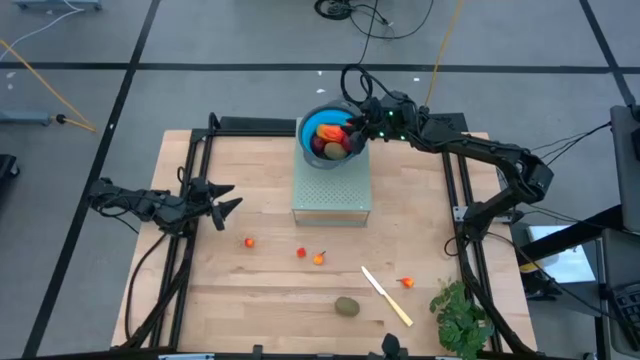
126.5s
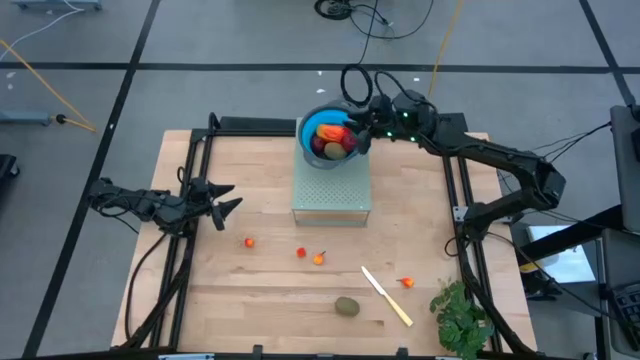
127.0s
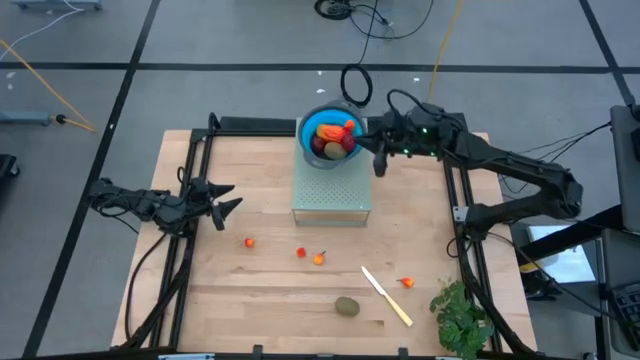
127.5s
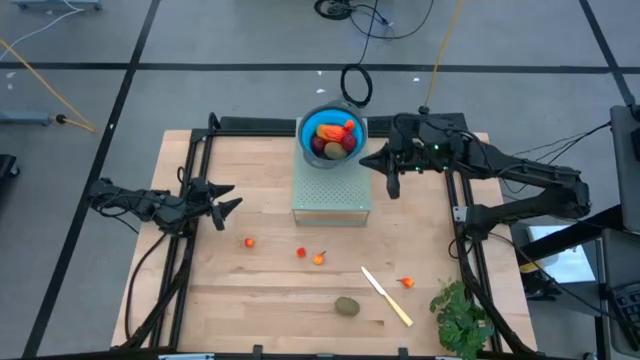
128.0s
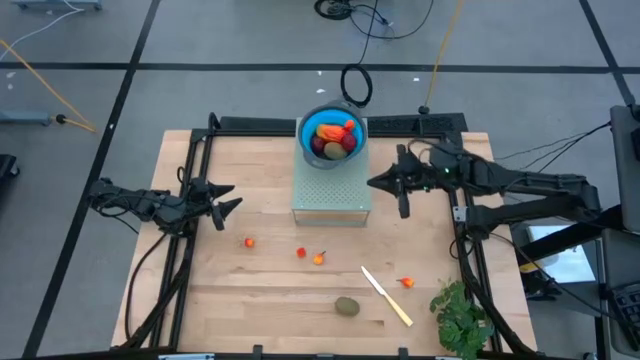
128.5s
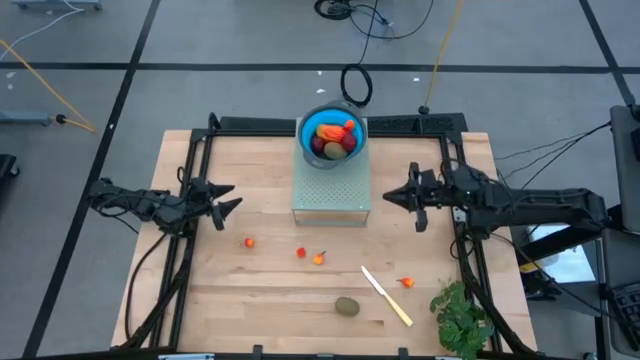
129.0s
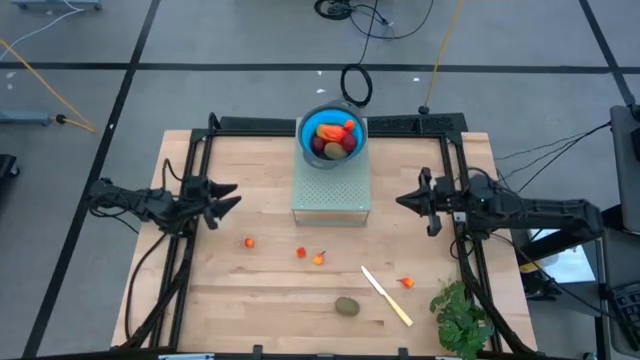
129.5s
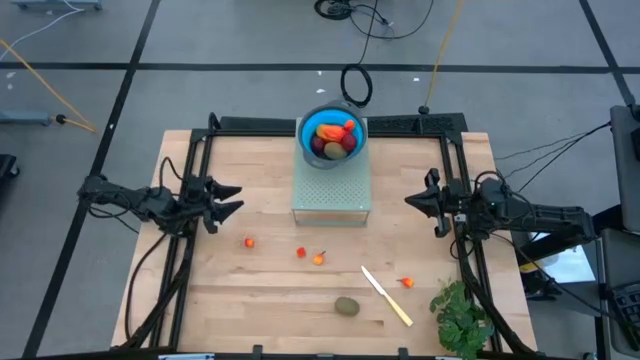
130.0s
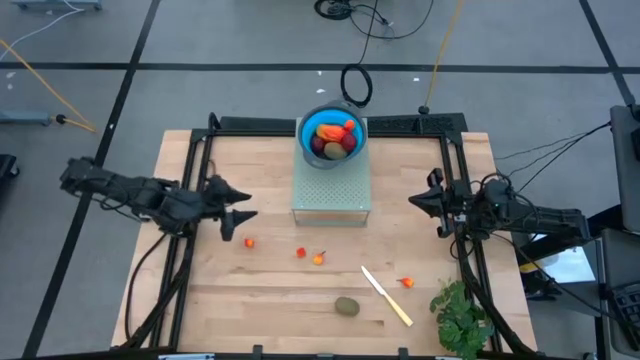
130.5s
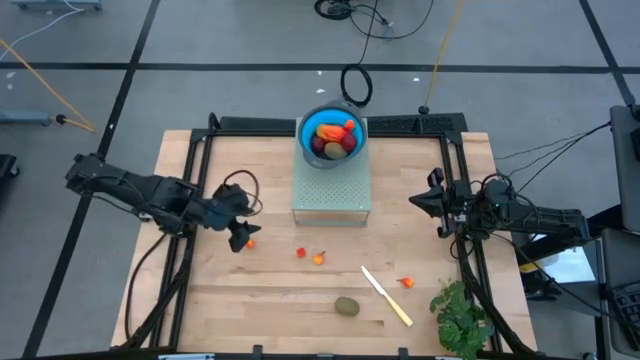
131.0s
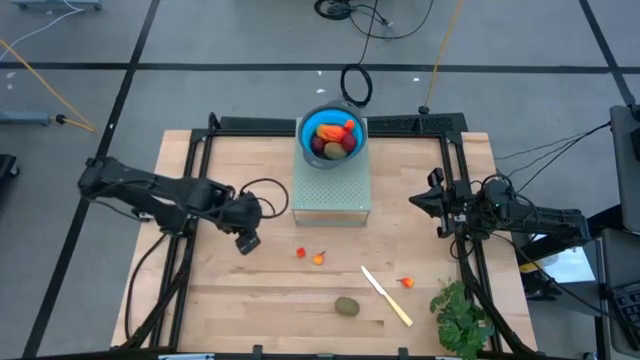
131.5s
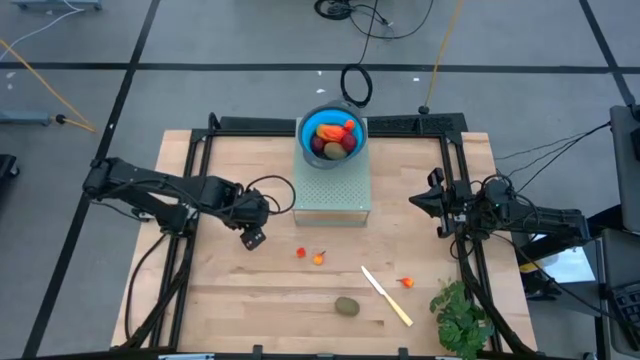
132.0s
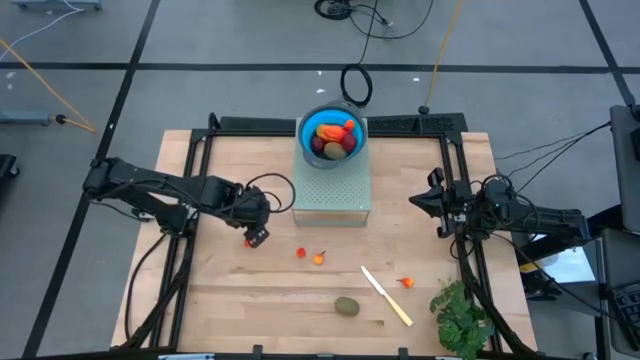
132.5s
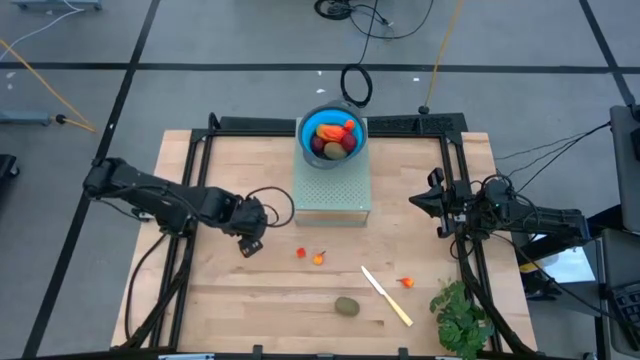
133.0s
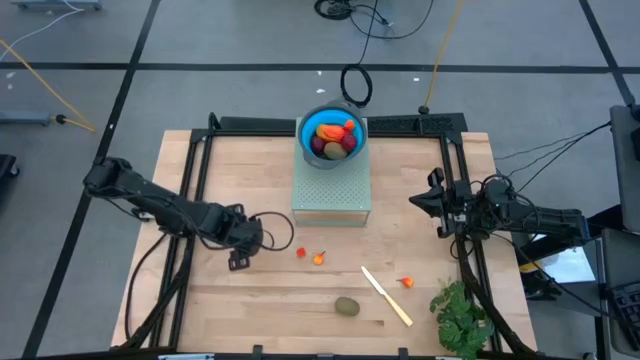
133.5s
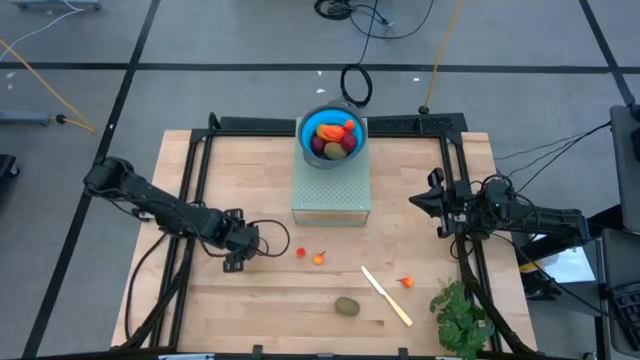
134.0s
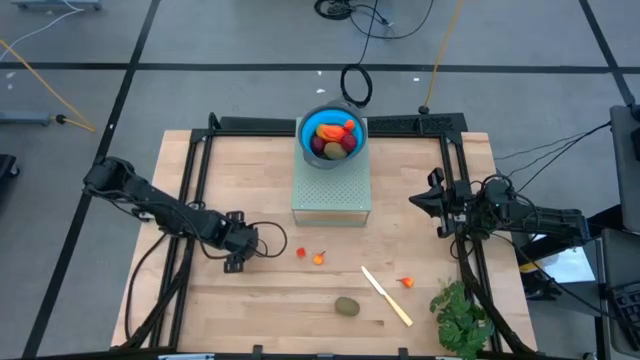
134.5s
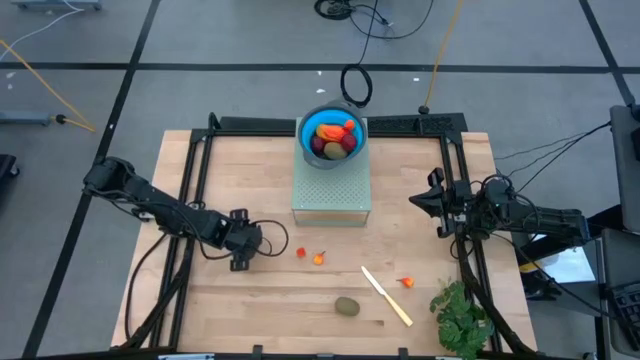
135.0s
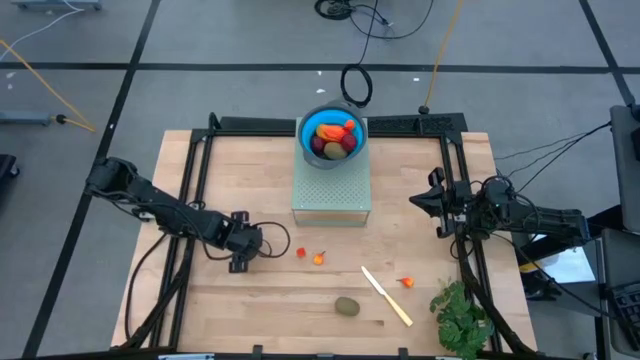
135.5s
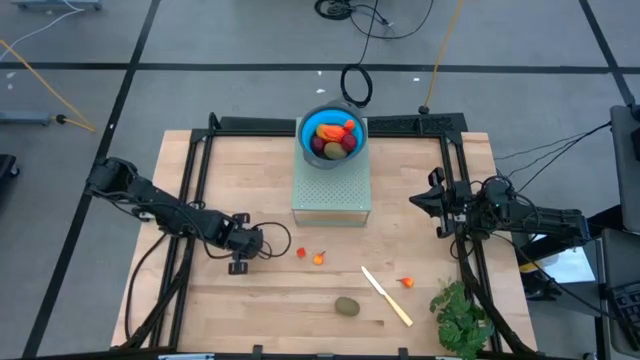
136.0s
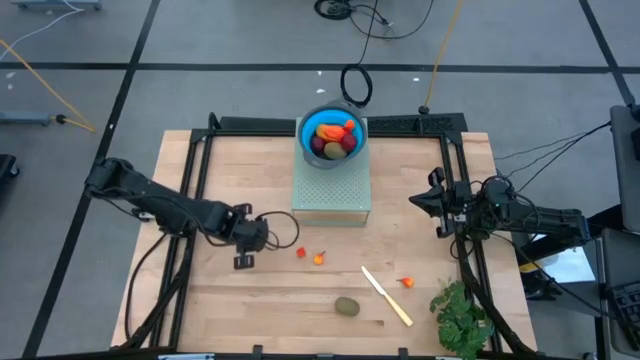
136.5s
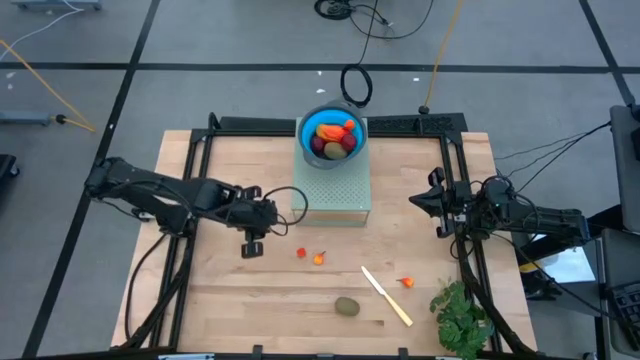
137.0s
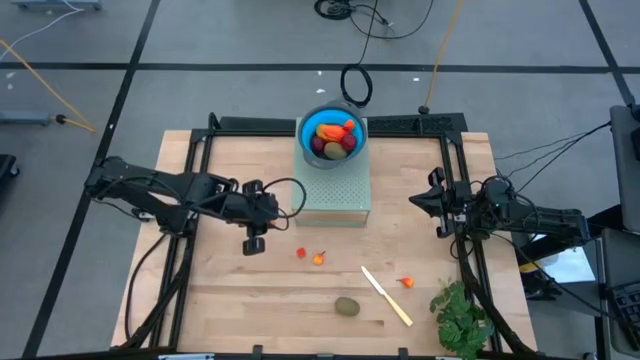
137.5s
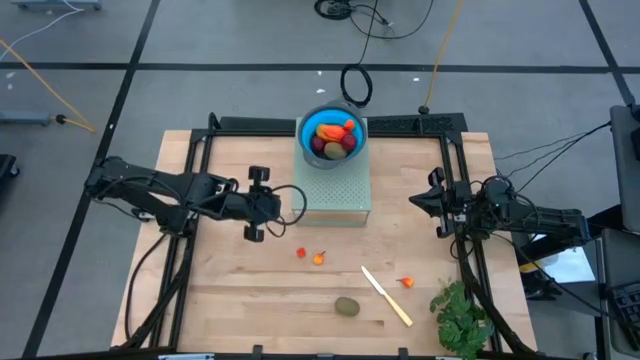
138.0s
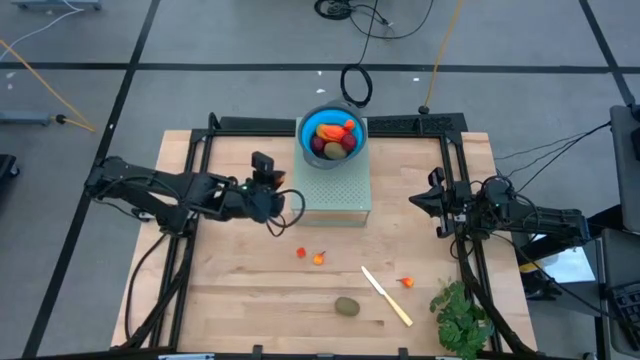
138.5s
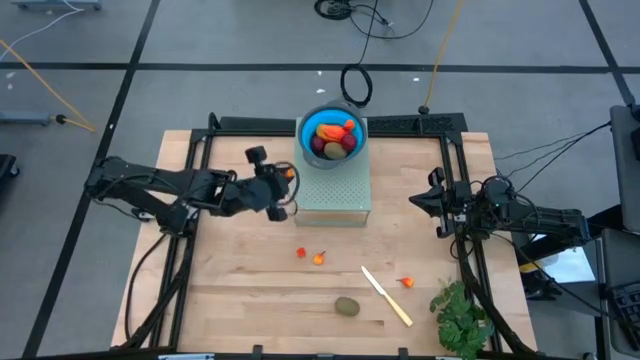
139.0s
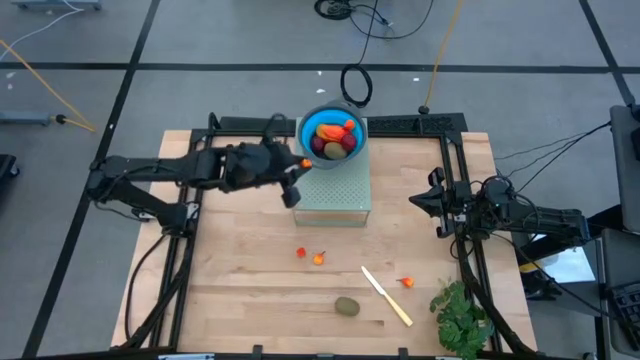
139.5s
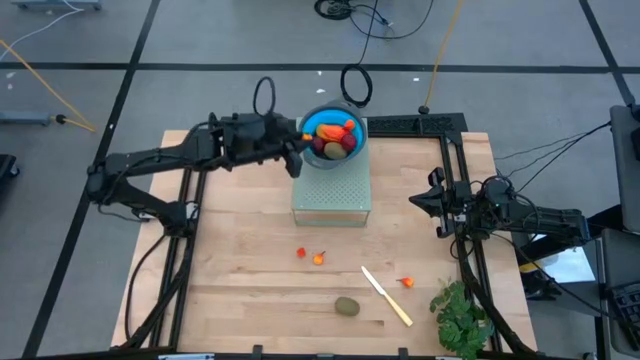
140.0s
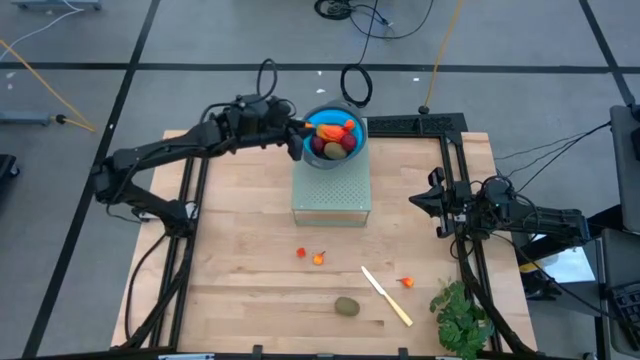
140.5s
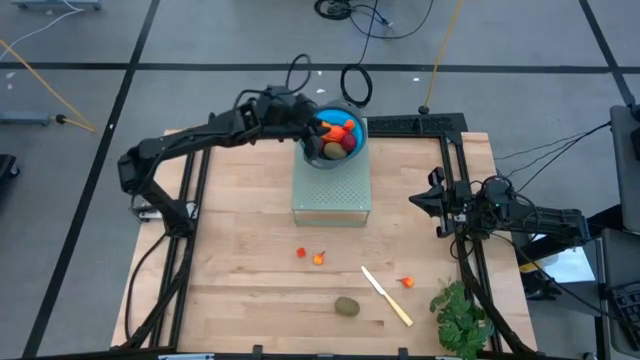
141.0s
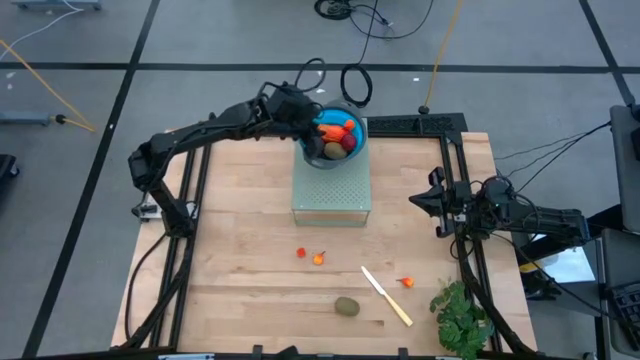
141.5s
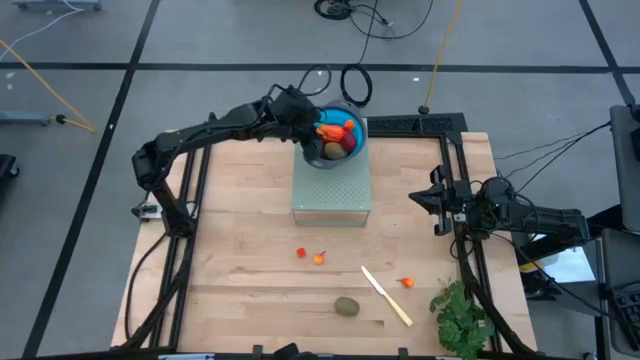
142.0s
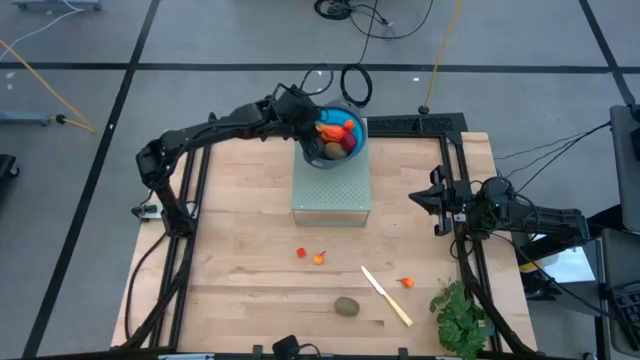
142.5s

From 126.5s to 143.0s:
Task: Pick & Place Fruit
Put the peach into the blue strainer bowl on the shelf

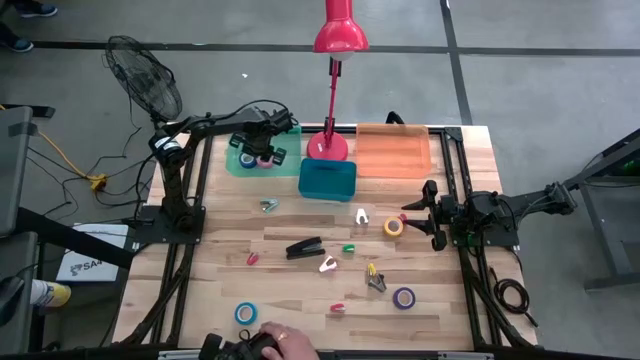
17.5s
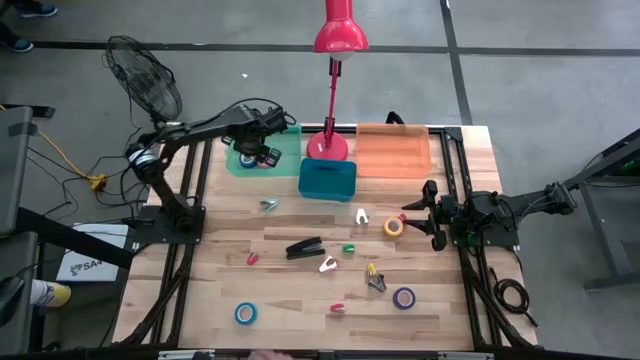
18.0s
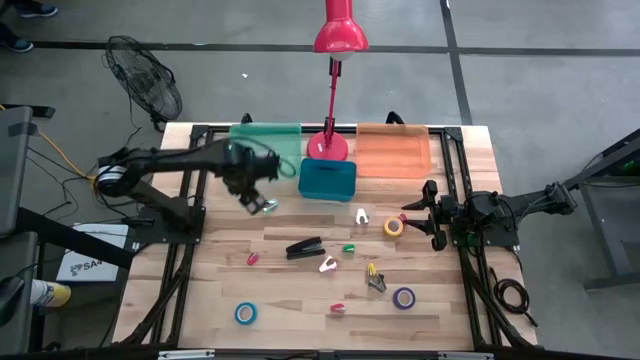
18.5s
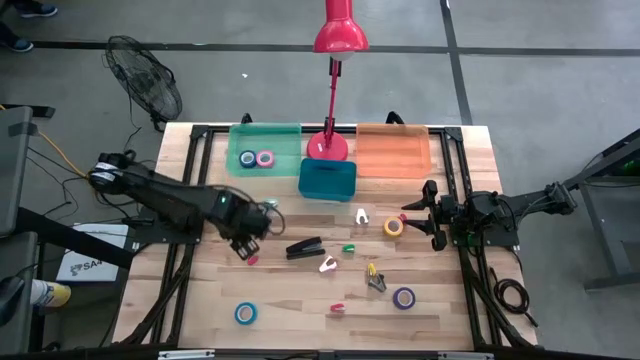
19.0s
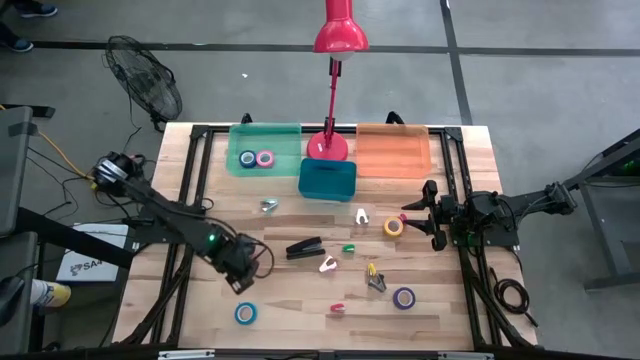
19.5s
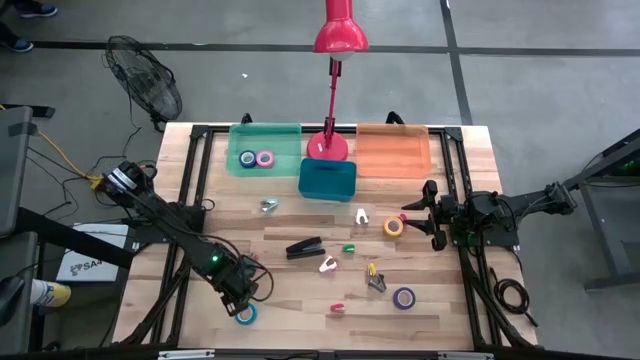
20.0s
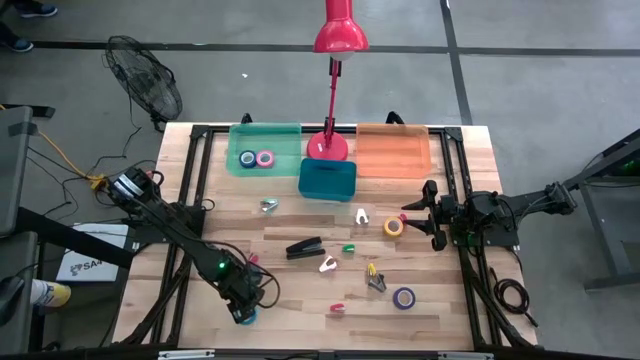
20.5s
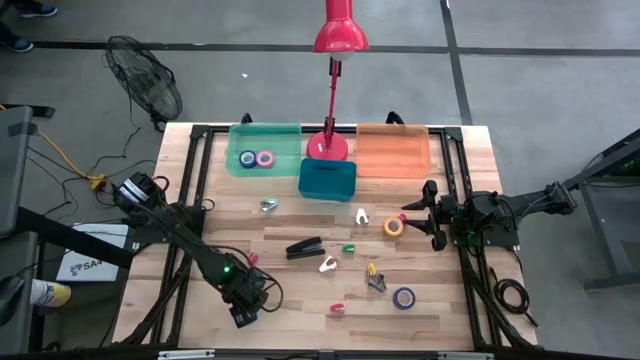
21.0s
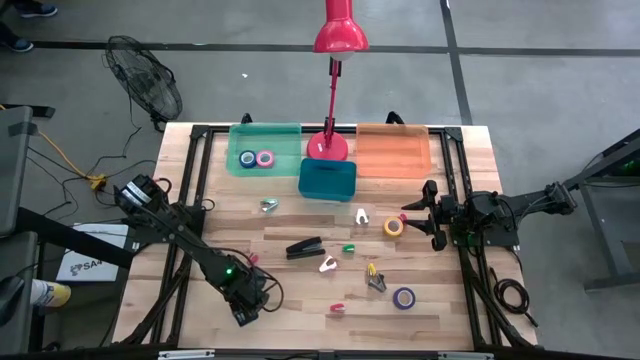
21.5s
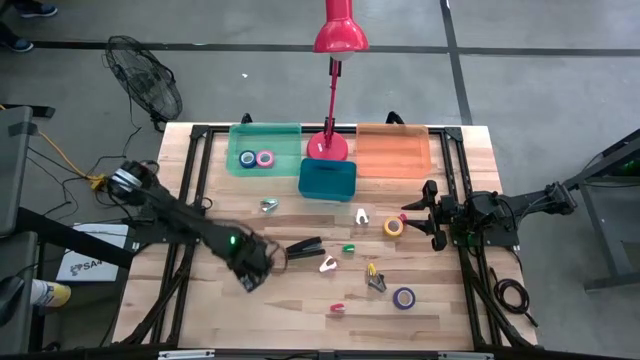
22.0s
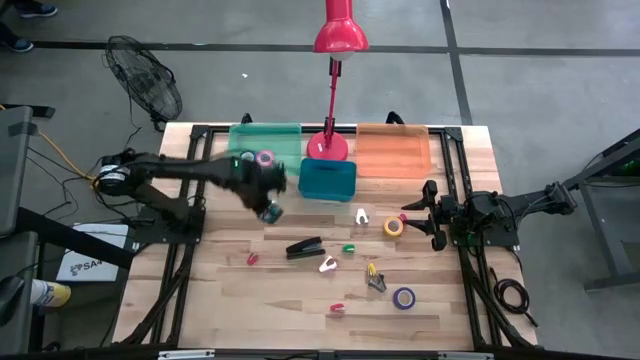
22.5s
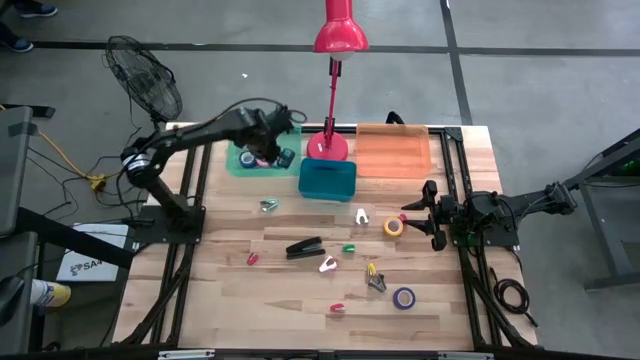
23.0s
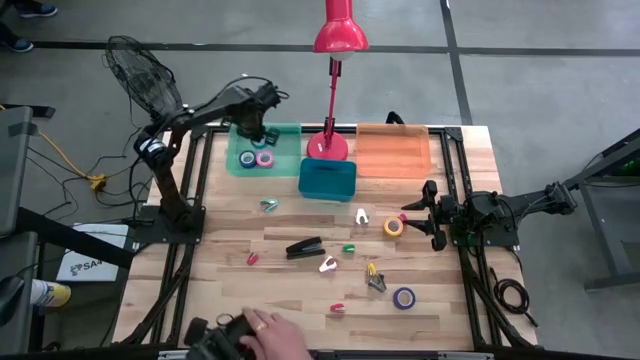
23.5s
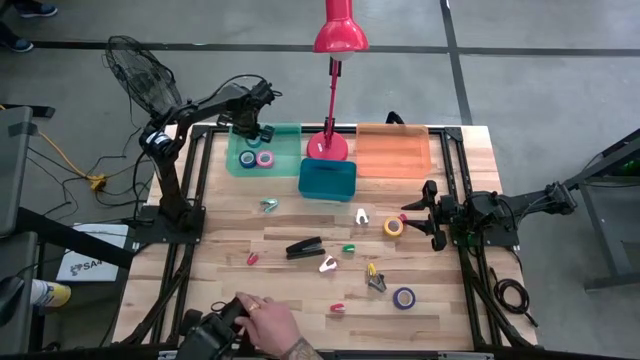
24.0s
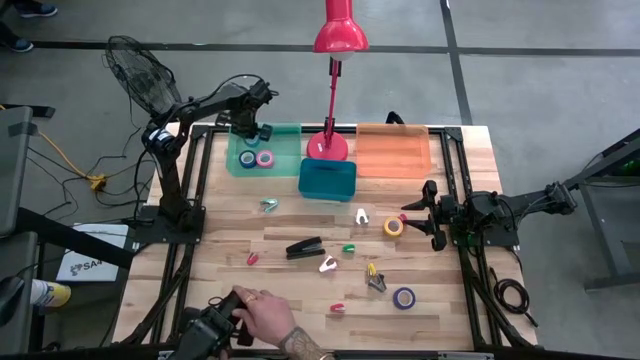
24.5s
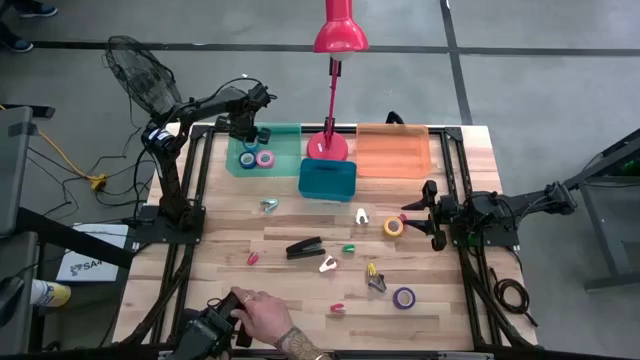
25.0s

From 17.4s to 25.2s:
Task: Pick and place Stapler, Stapler remover, tape
Put the light blue tape into the light green bin
